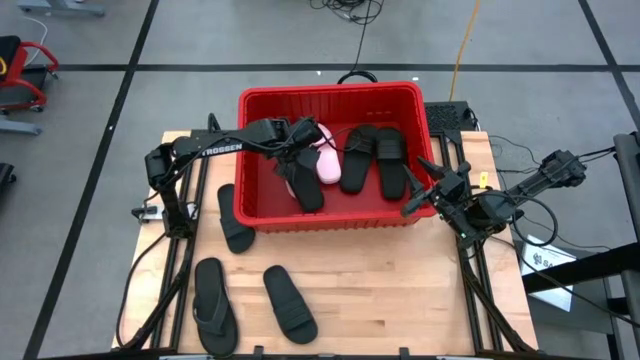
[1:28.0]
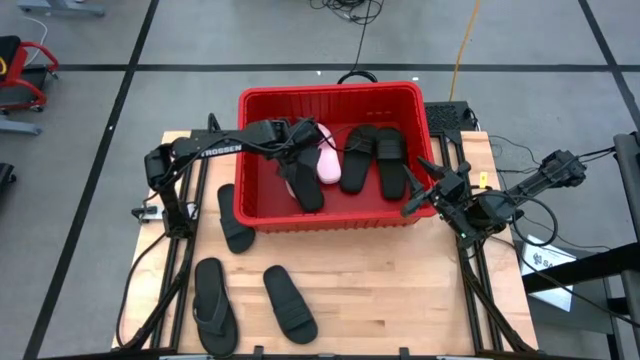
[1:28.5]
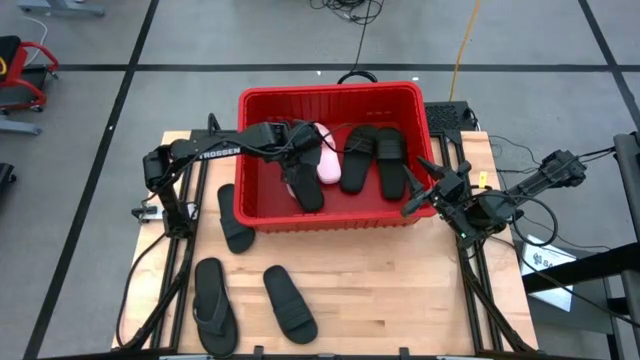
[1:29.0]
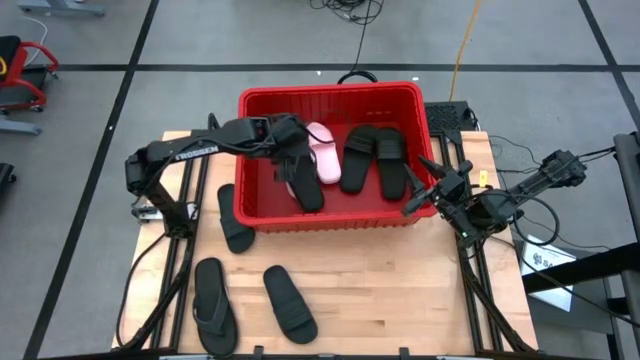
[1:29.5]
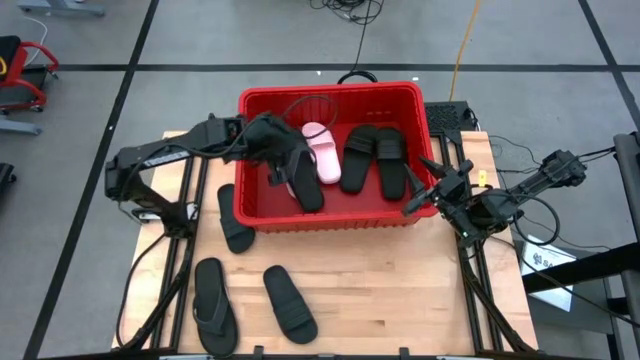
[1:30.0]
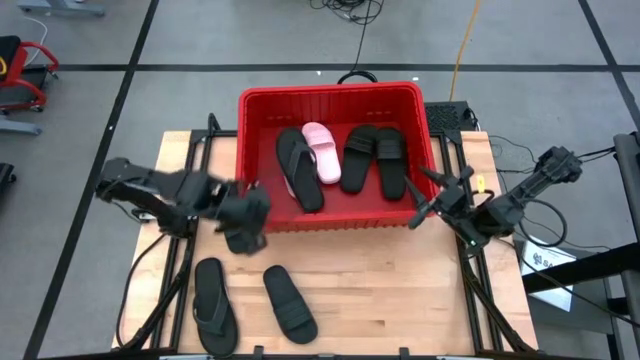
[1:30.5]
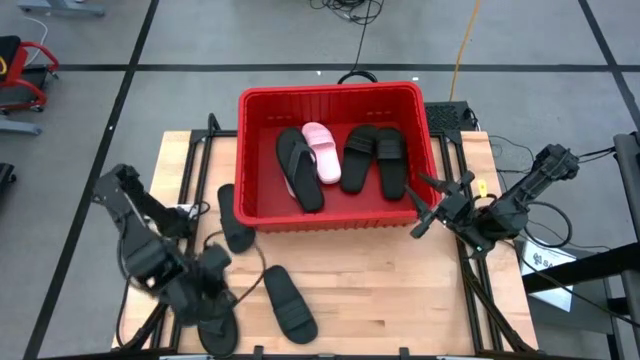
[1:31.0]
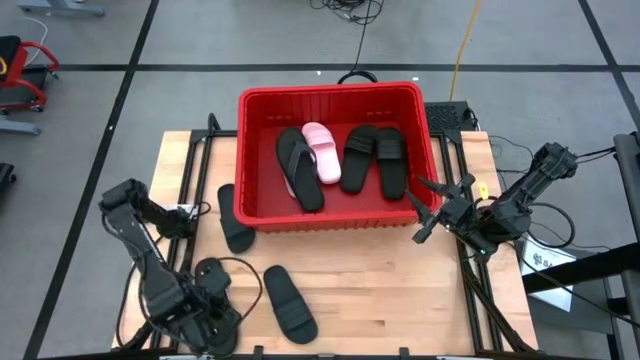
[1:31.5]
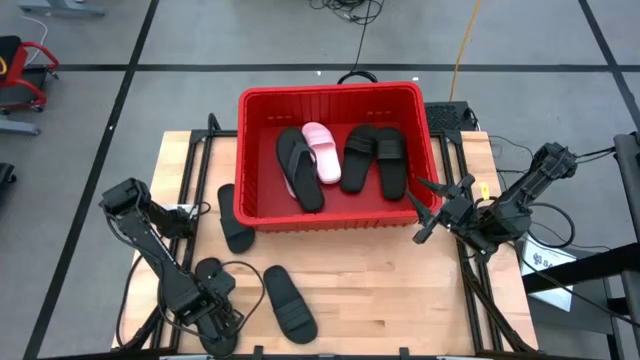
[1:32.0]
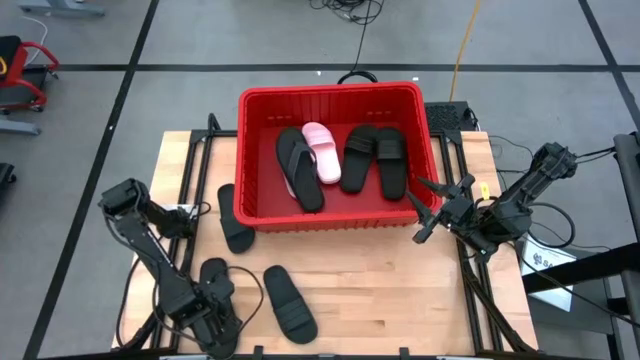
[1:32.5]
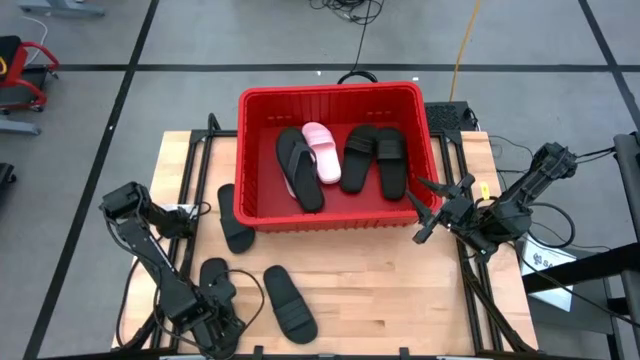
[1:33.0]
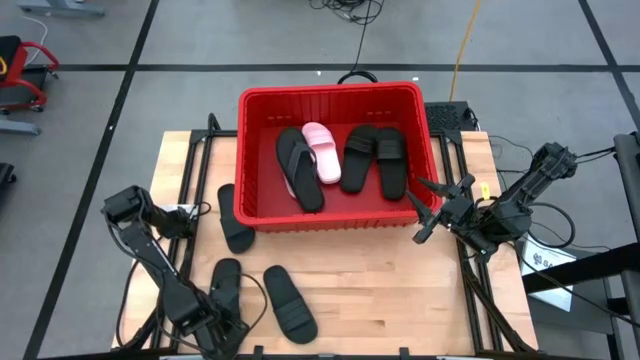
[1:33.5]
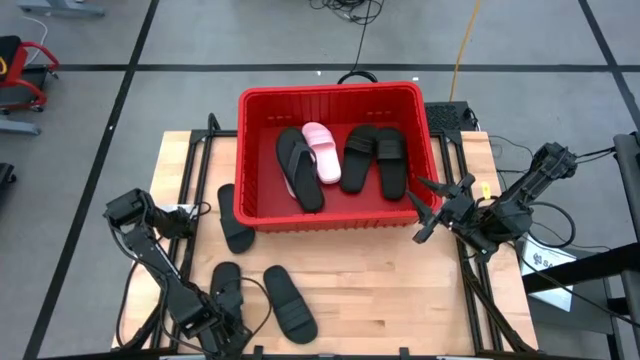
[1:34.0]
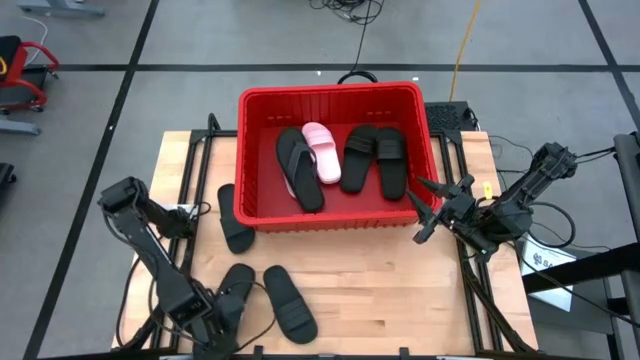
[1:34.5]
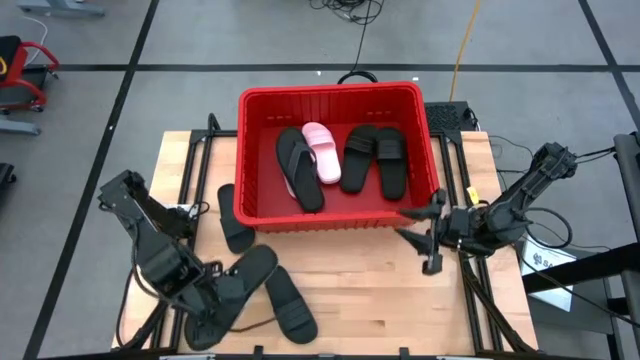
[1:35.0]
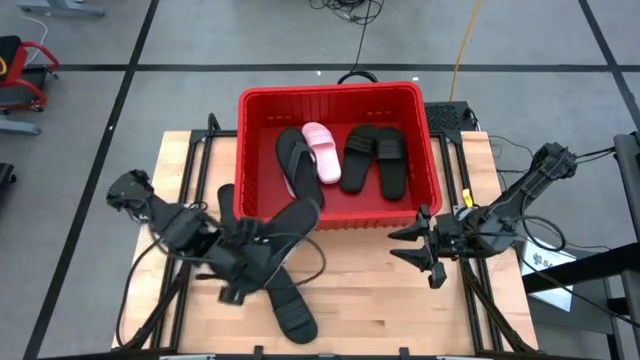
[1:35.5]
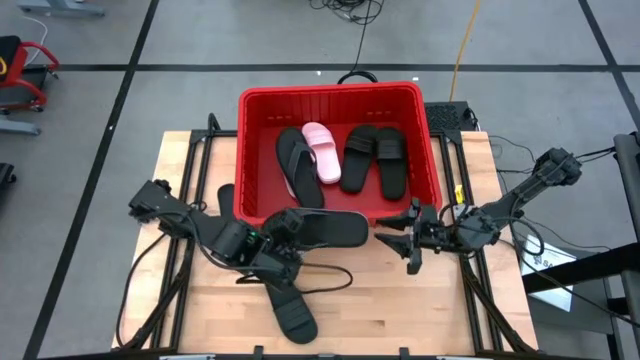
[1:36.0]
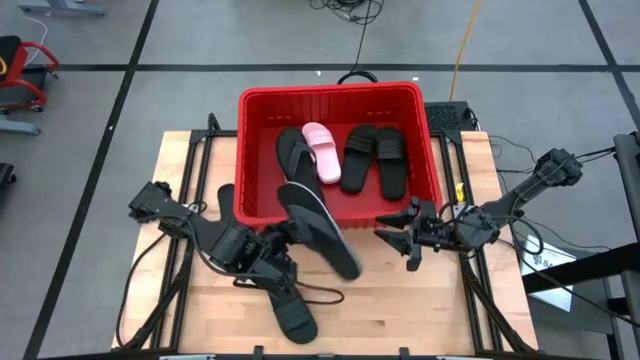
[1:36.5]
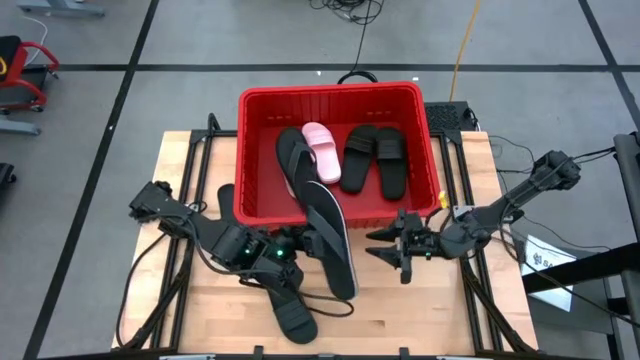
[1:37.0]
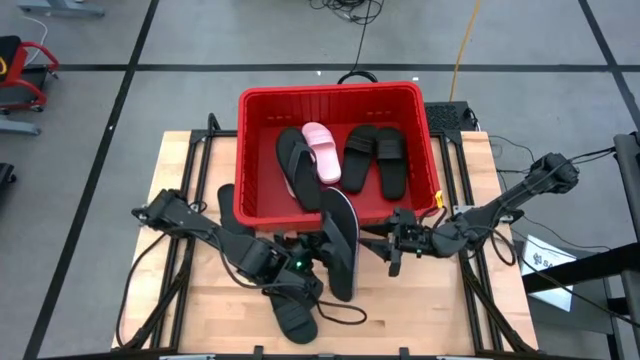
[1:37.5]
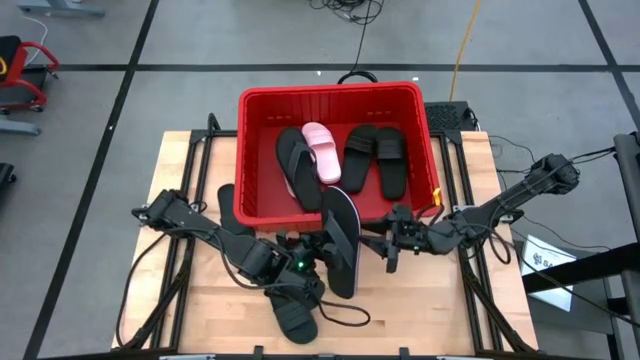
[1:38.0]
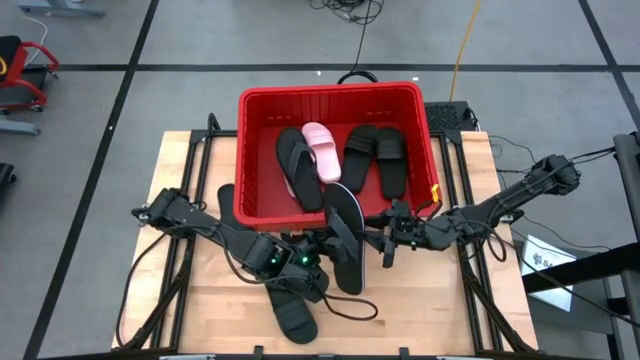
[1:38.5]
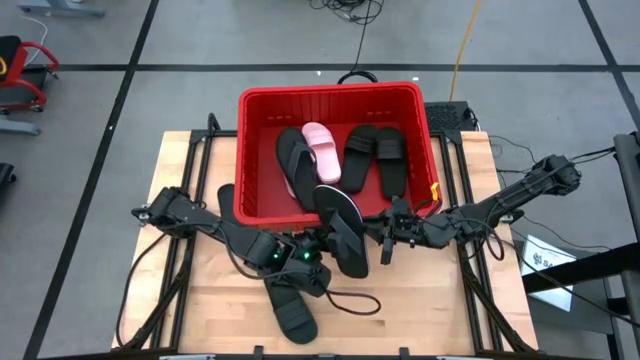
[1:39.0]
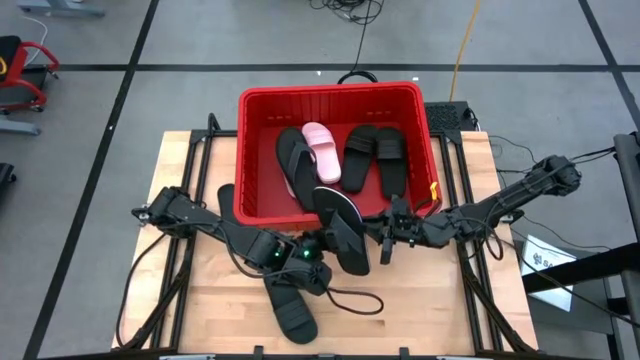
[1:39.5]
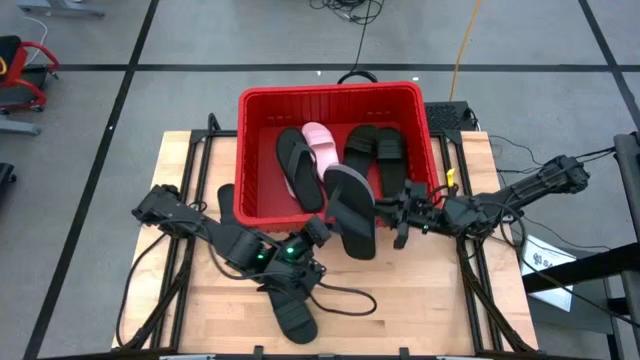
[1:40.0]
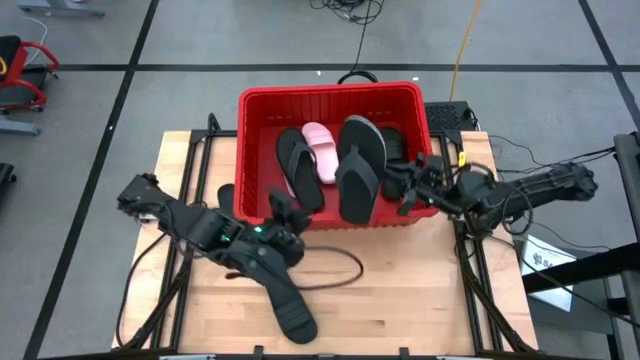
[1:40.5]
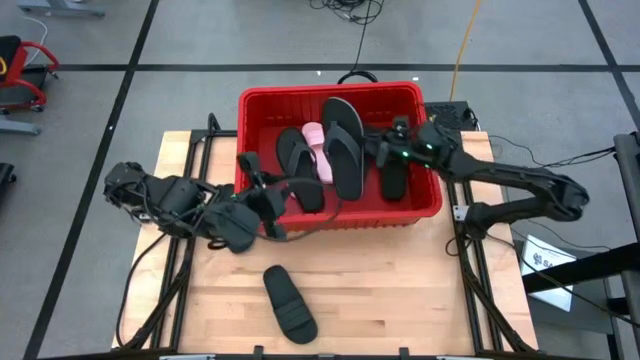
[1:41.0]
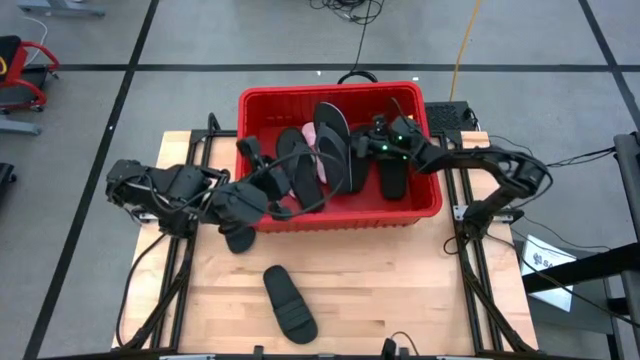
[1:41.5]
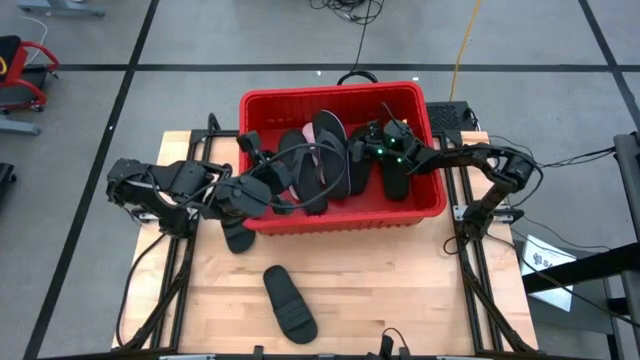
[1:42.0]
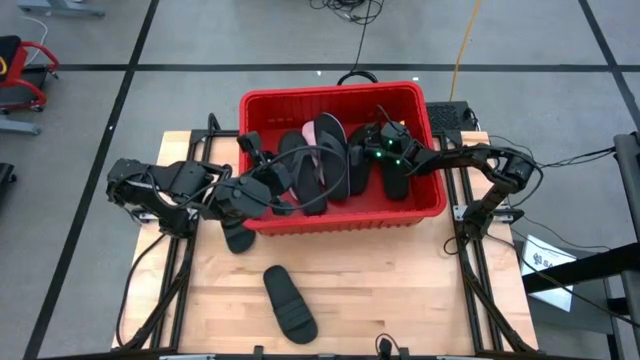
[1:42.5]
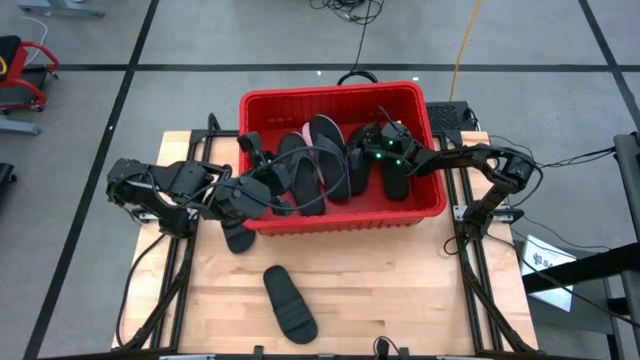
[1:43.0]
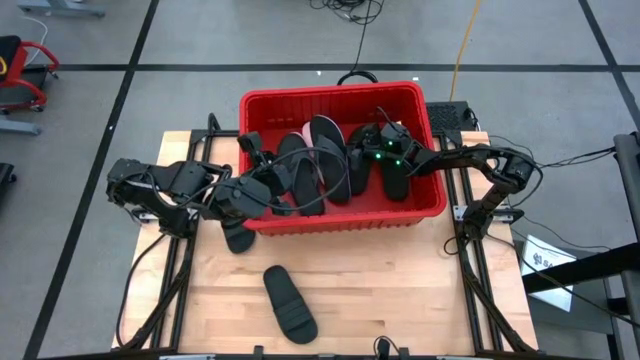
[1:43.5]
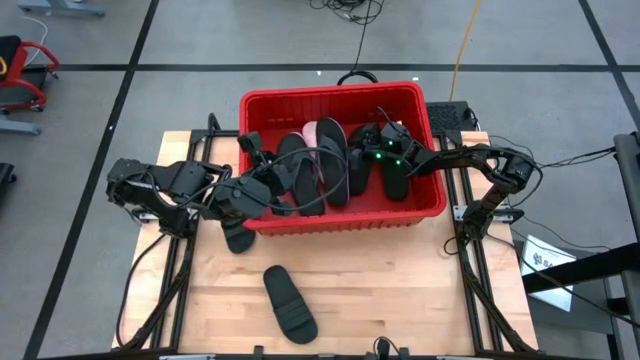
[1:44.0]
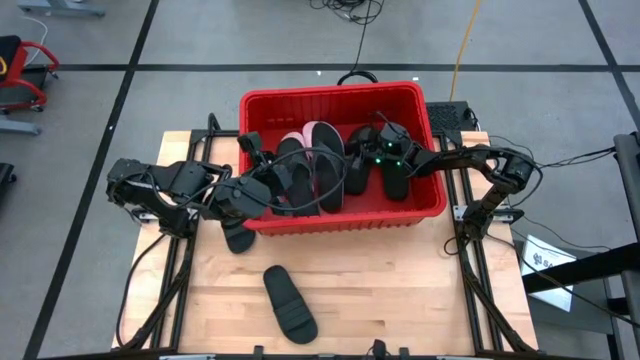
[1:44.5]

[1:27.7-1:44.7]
Task: Pick and place slides into bin
Put the black slipper into the red bin

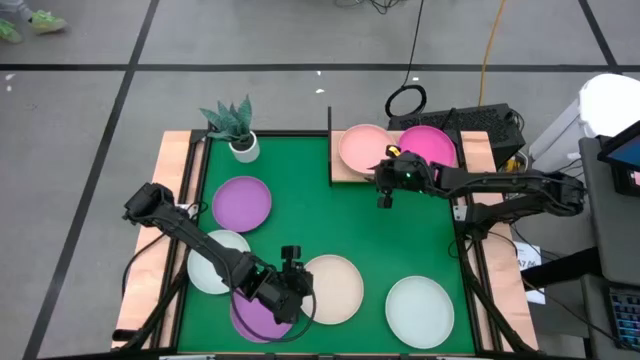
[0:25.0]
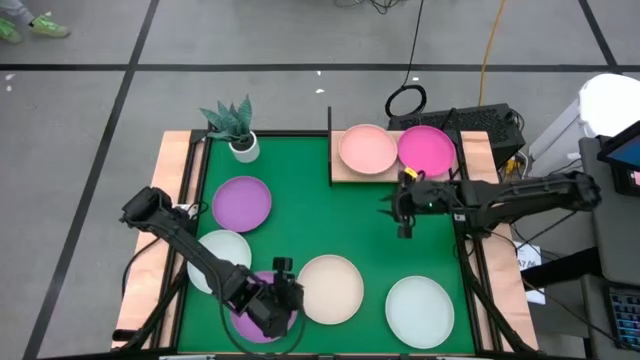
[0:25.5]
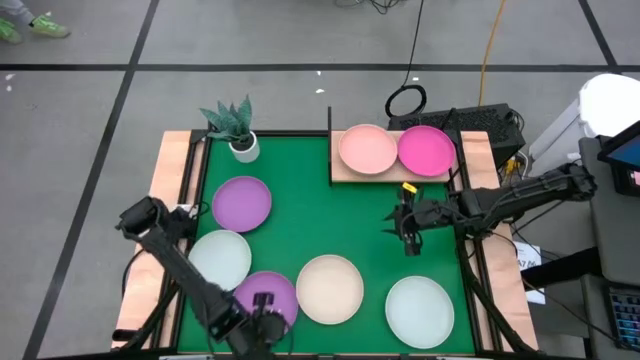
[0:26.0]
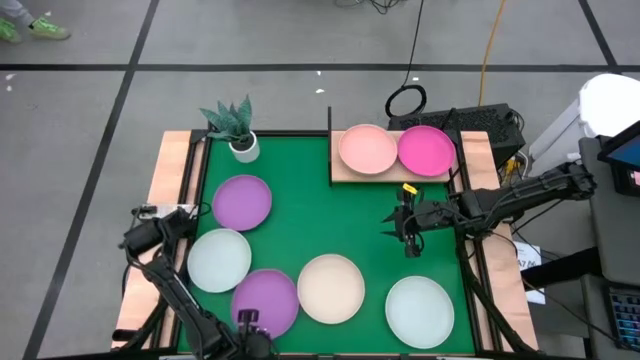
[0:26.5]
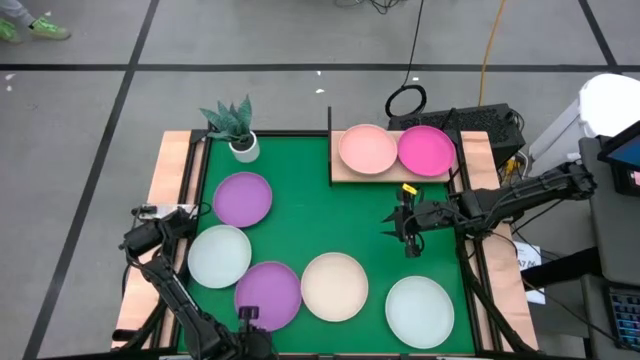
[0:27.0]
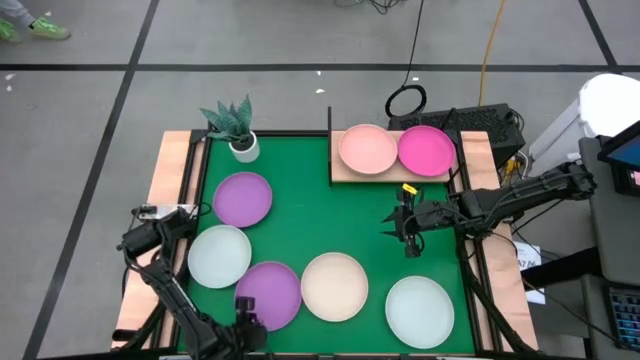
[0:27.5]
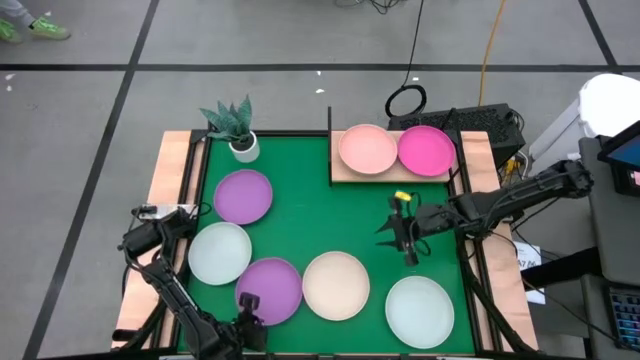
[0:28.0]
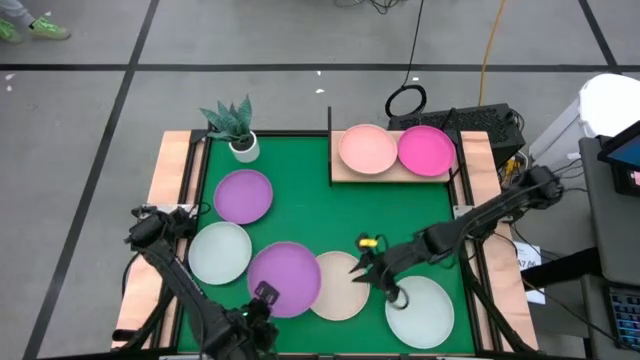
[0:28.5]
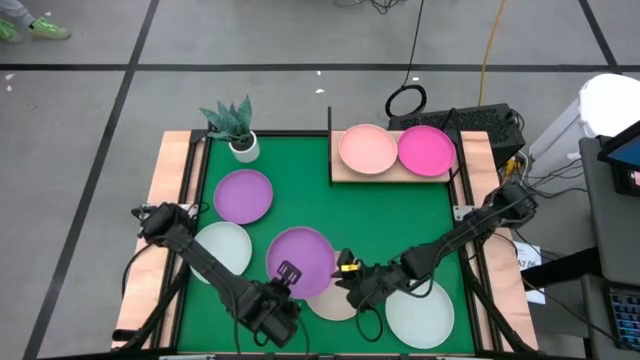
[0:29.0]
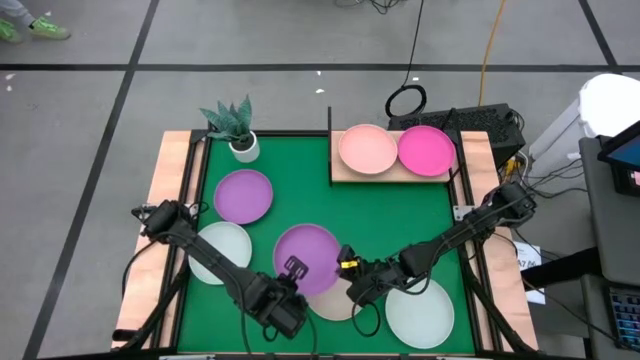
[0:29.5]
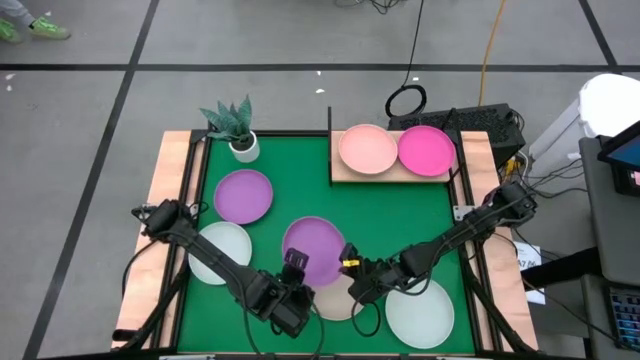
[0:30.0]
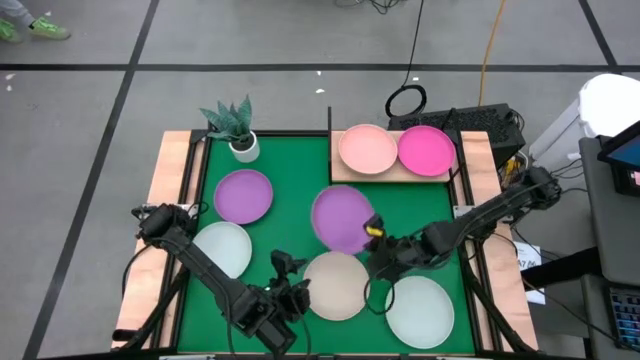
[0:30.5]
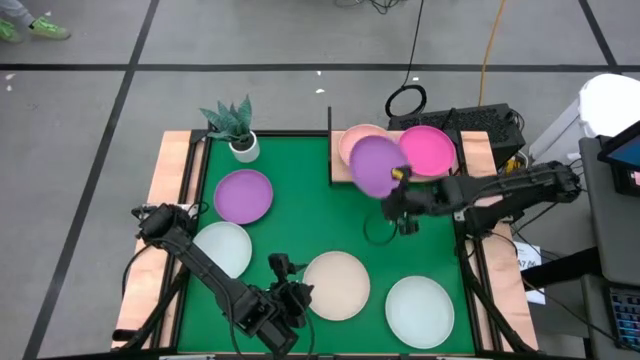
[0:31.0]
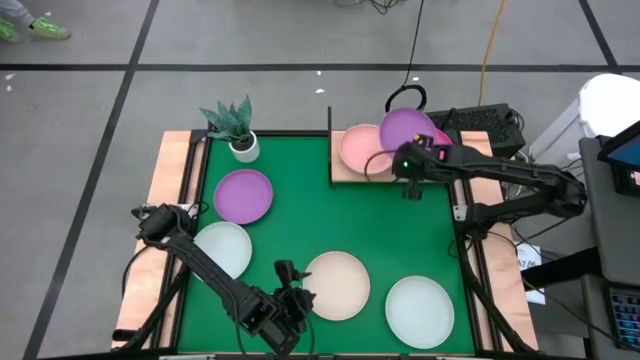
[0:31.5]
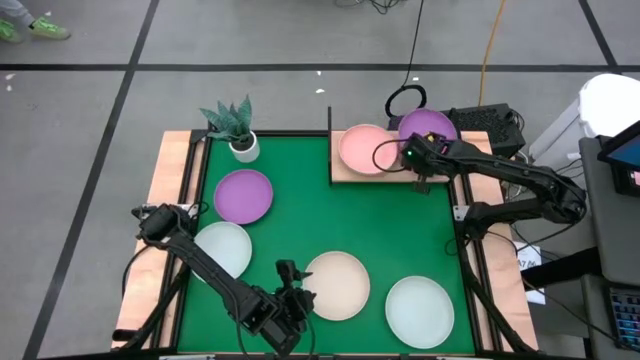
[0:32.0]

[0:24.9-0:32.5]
Task: Place and stack plates onto a shelf
Stack the bottom purple plate on the light red plate in the shelf
